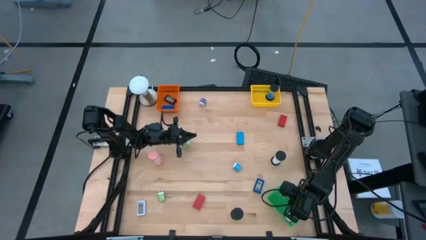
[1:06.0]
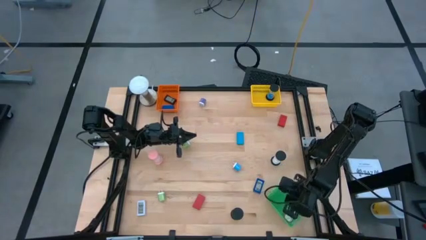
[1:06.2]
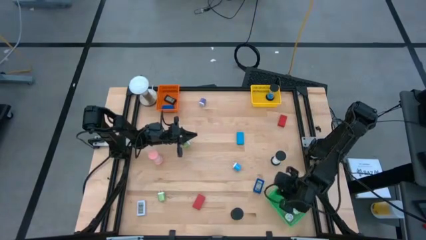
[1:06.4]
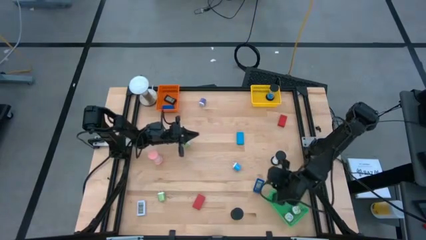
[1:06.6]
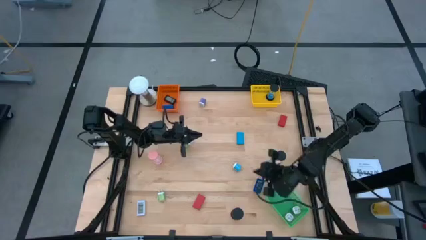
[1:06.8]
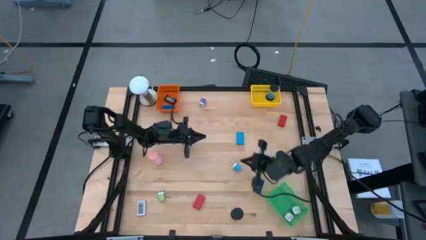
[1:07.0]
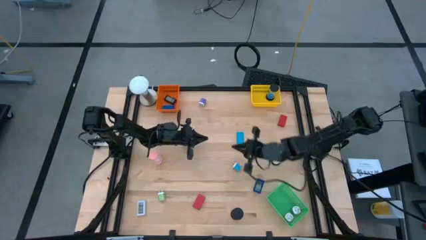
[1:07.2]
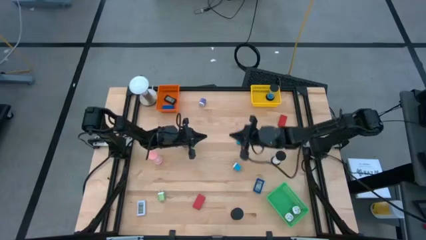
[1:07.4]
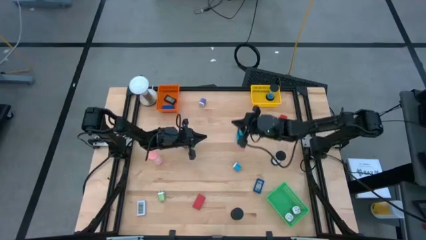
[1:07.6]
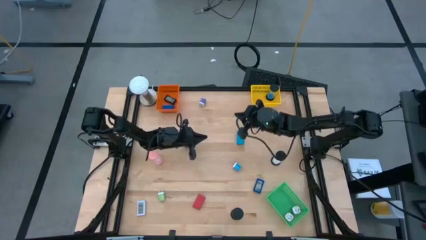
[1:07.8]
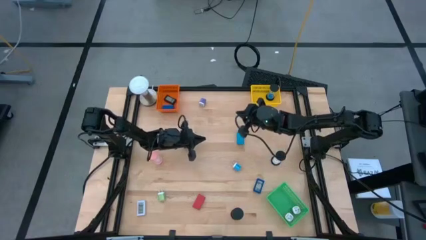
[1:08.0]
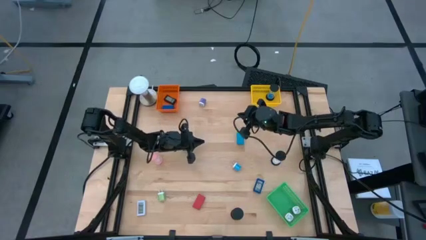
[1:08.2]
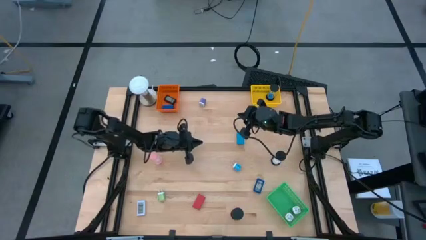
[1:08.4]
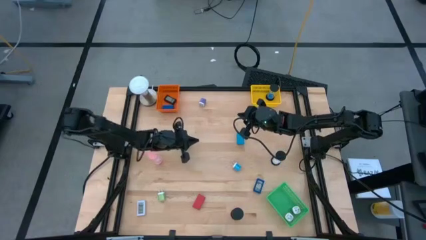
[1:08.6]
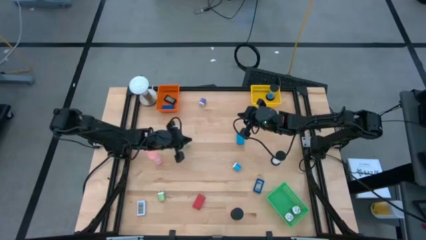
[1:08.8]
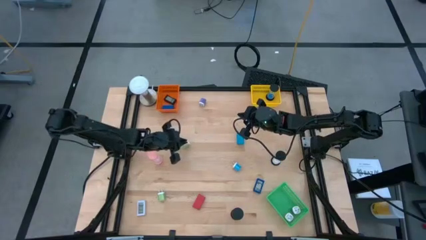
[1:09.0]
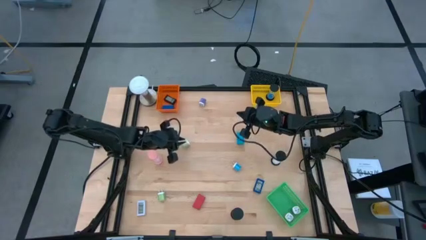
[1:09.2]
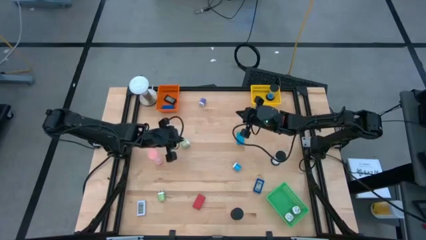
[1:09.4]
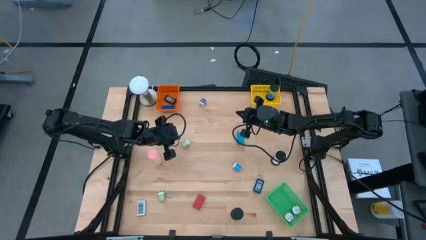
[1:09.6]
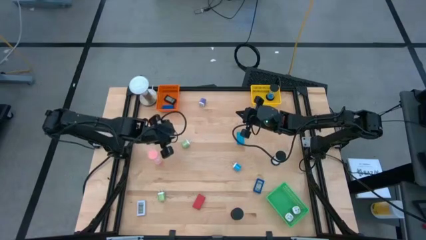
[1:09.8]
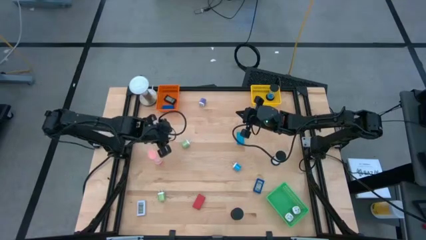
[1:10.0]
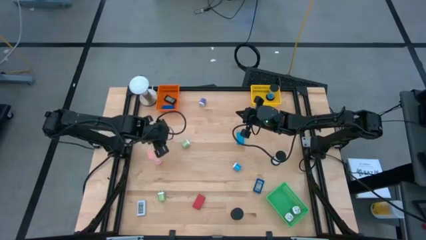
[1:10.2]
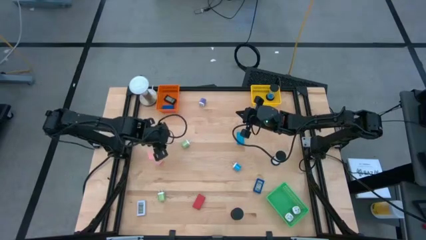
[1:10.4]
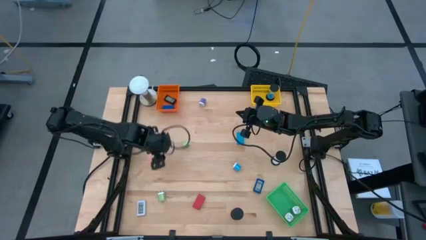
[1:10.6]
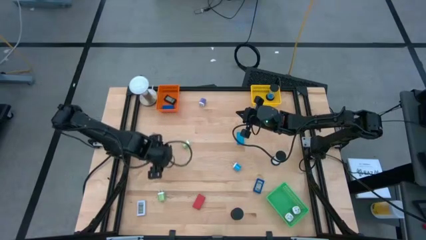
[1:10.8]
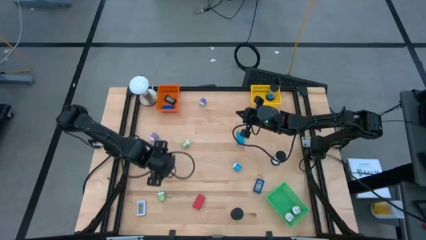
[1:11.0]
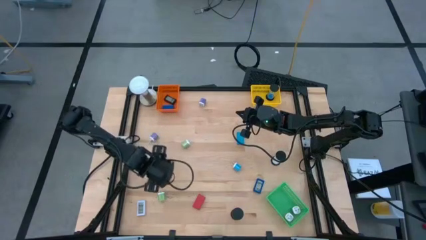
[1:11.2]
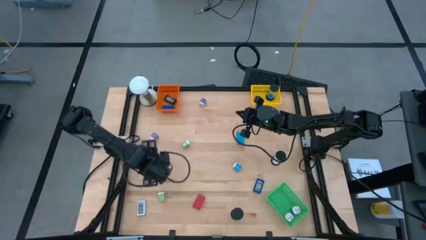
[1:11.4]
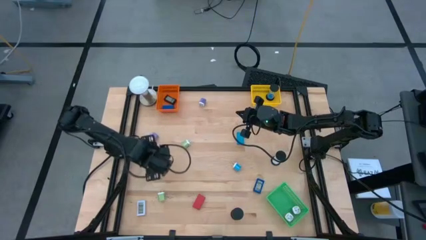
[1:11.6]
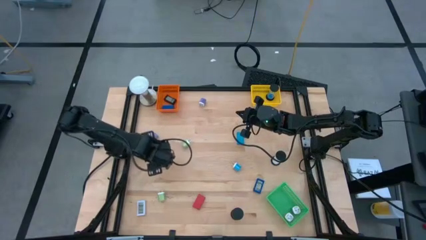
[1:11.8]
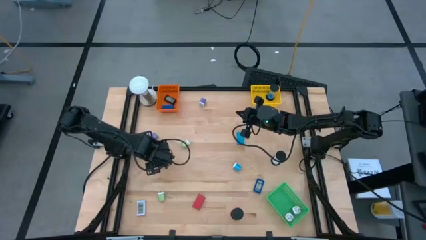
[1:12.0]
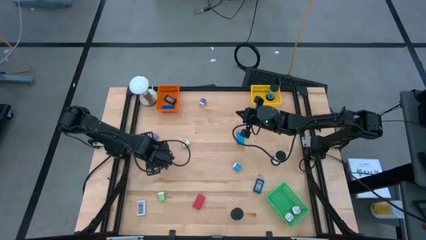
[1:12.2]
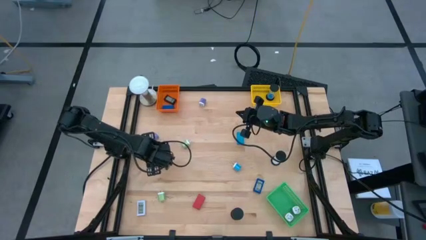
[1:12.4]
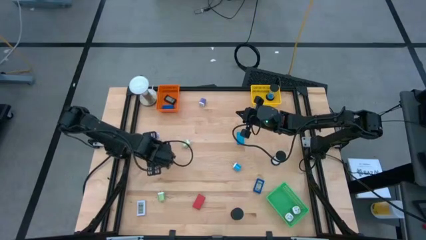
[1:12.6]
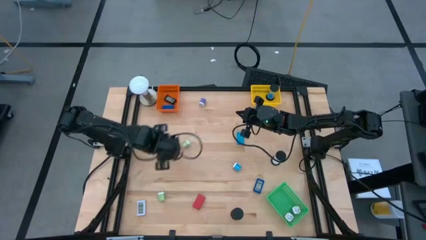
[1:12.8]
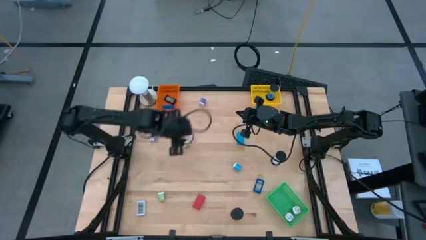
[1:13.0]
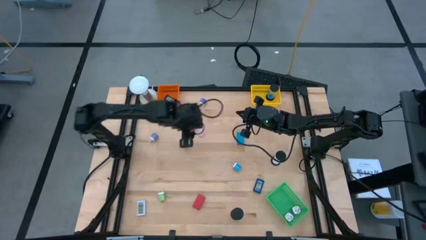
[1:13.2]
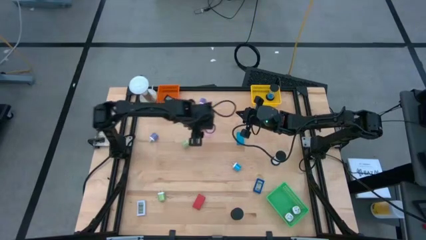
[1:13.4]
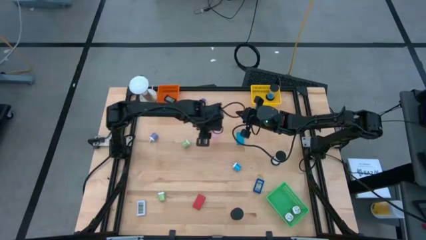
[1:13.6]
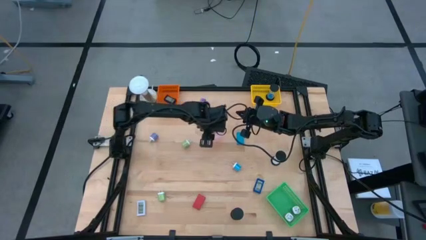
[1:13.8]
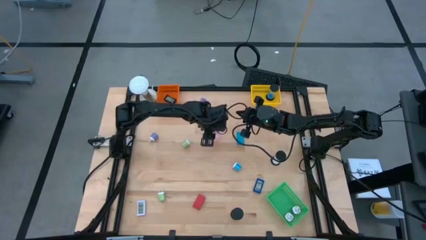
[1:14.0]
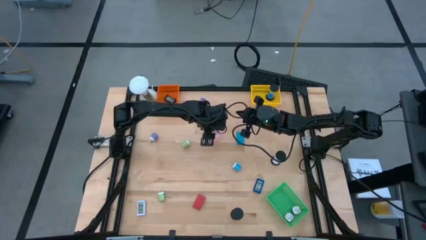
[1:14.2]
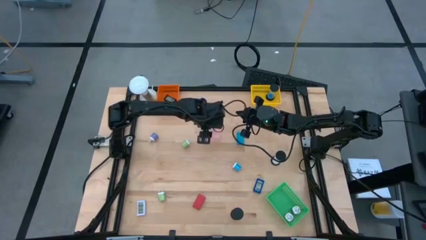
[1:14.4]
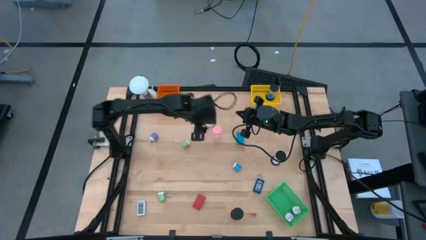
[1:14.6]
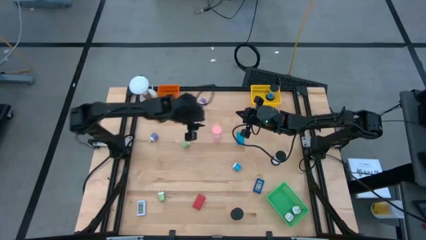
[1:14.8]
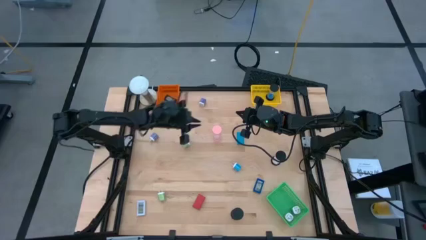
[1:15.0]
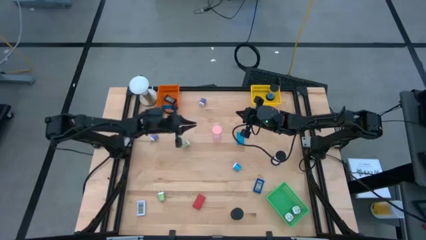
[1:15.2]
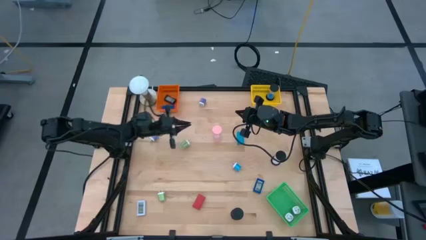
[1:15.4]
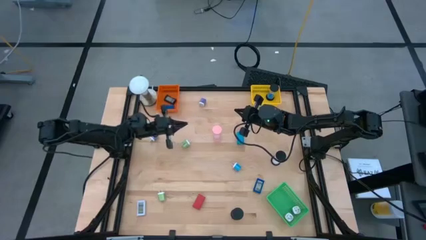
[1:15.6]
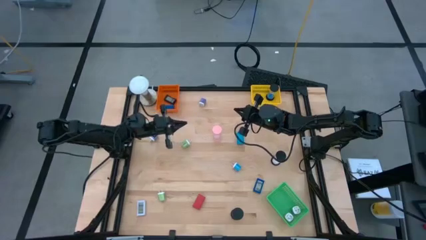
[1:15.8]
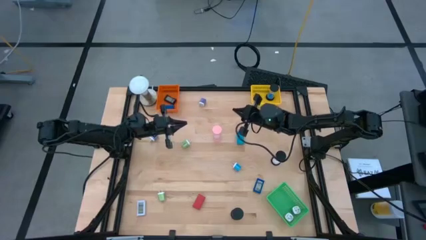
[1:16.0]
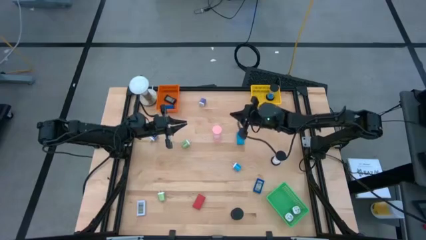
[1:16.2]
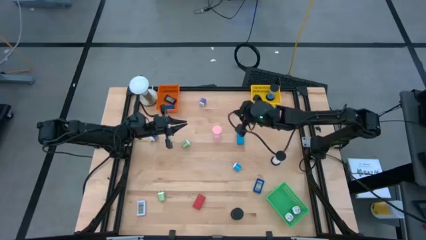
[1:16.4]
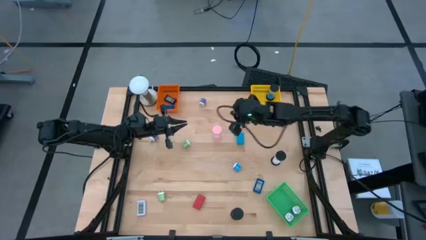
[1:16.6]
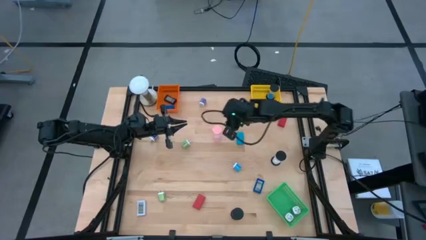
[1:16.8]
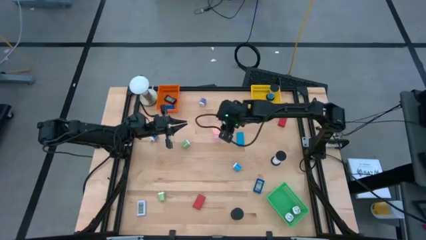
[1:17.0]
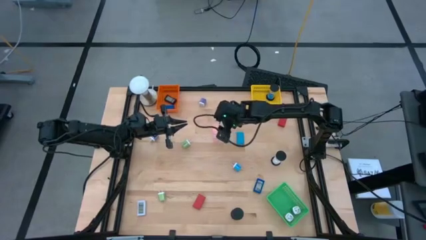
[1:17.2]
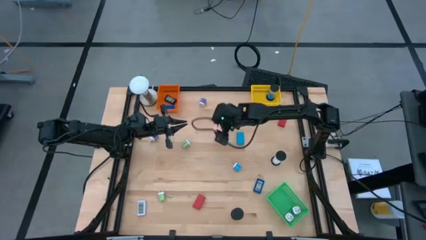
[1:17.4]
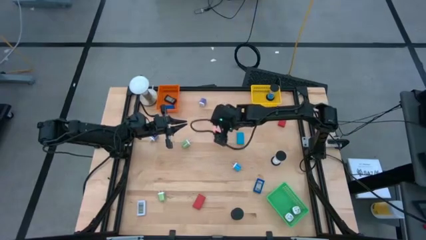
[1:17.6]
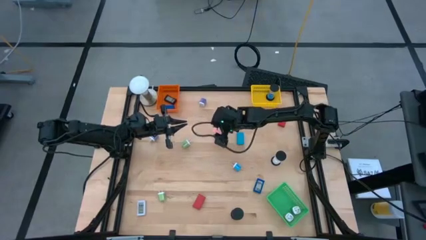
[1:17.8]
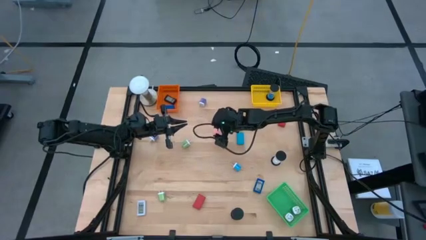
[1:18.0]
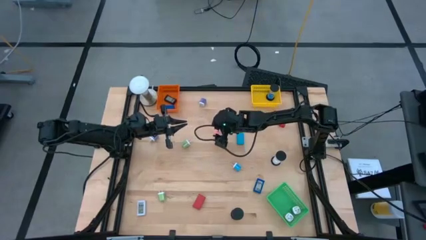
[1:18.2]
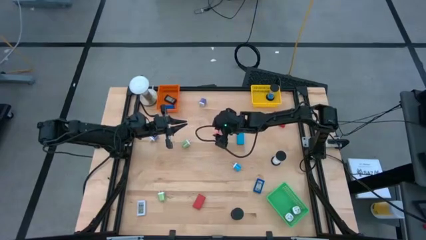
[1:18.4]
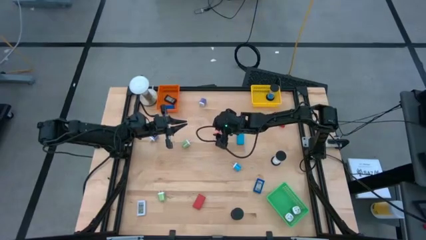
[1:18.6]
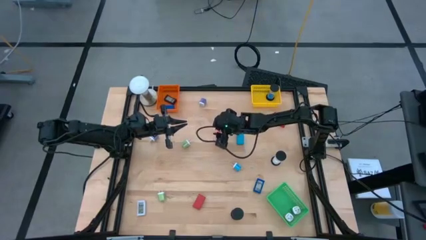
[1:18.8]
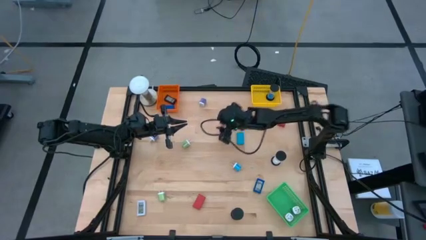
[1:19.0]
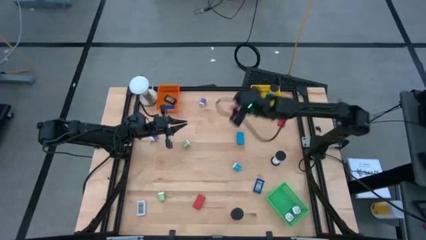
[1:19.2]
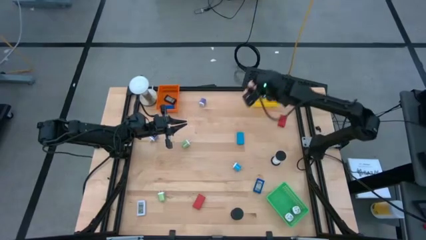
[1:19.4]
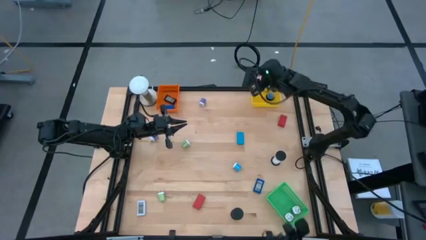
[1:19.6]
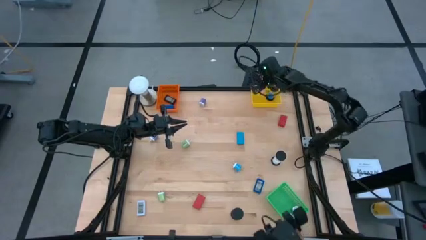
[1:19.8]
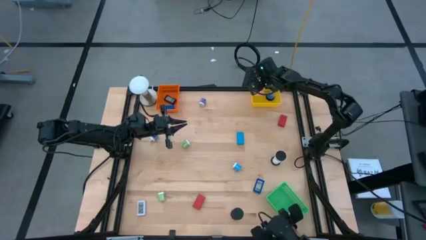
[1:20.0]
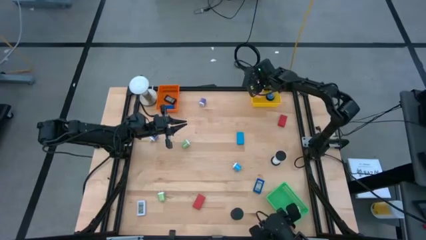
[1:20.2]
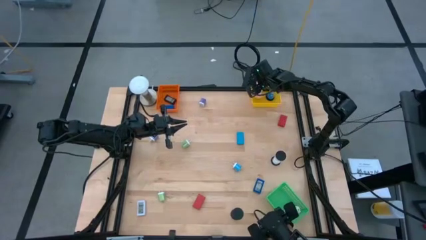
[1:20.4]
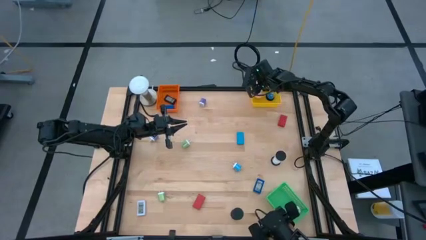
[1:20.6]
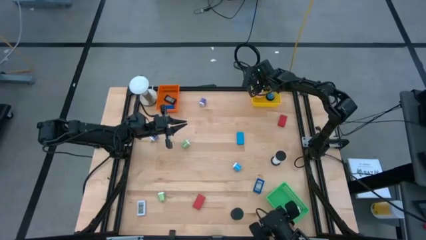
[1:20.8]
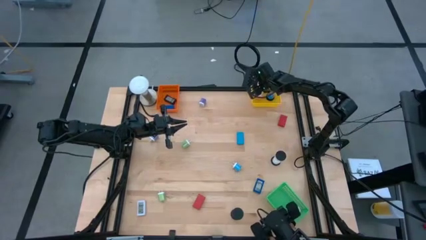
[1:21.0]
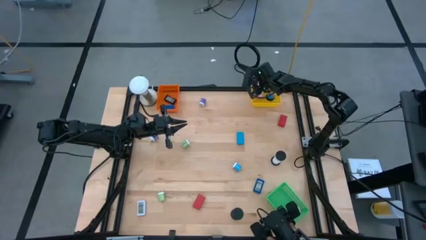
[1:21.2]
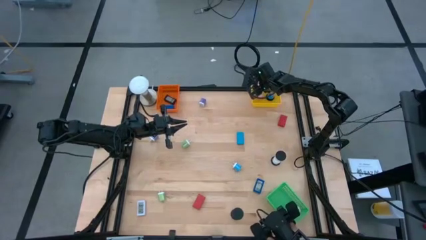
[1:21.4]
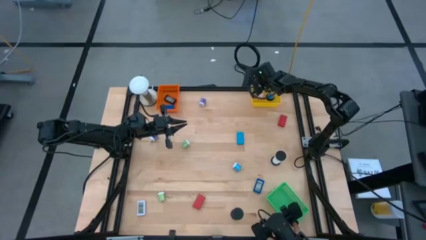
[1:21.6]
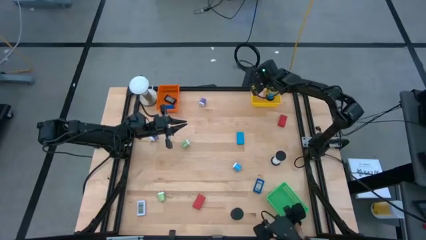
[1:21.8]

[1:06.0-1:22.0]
Task: Pick & Place Office items
Put the pink hourglass into the yellow bin
